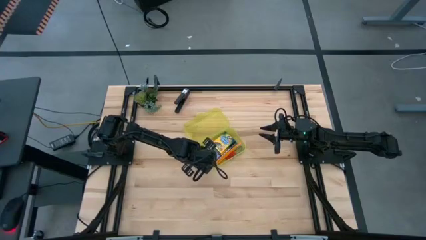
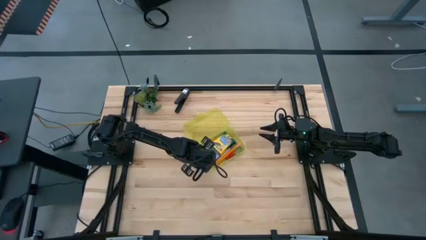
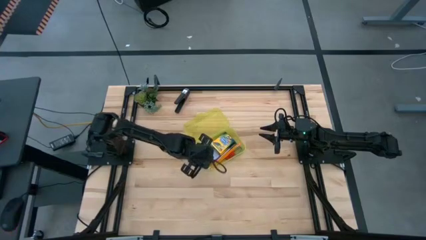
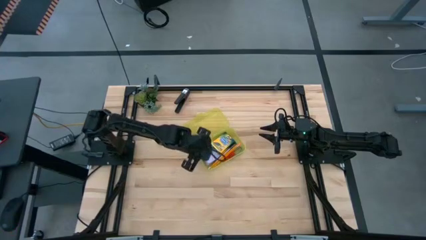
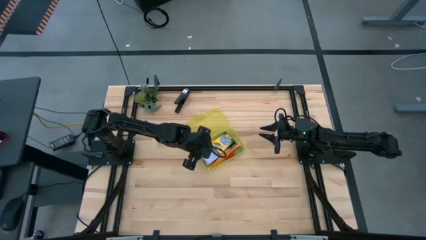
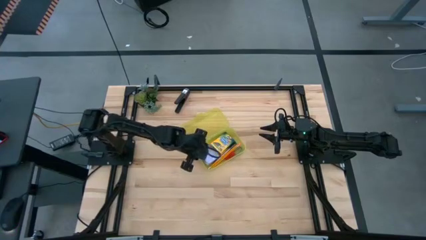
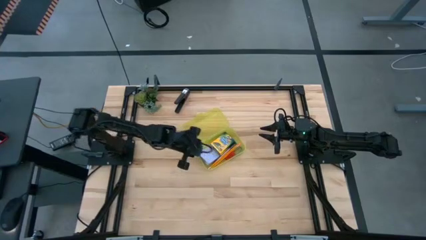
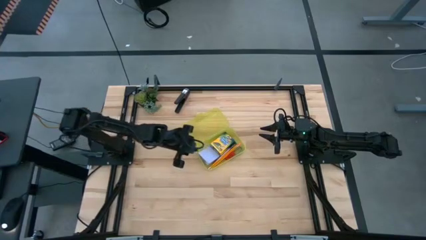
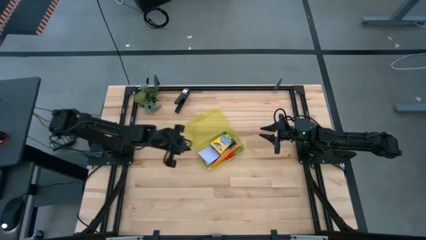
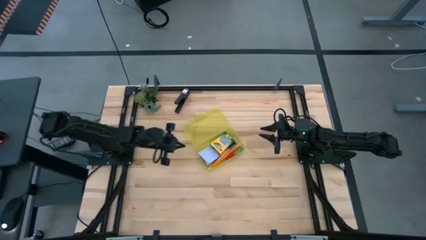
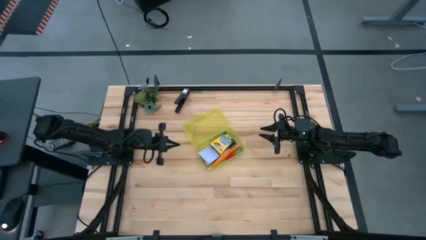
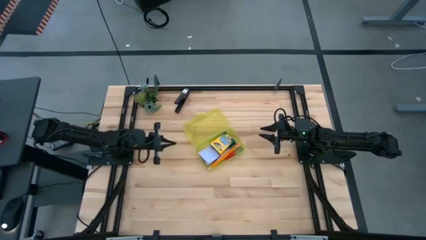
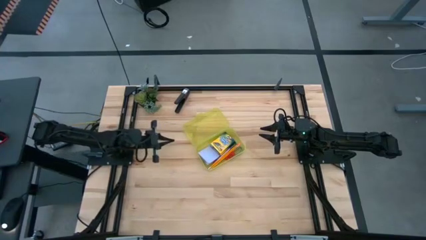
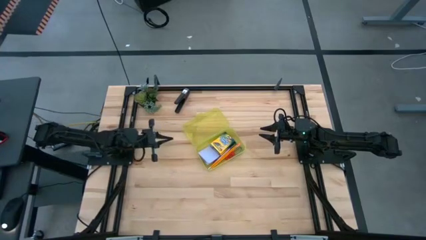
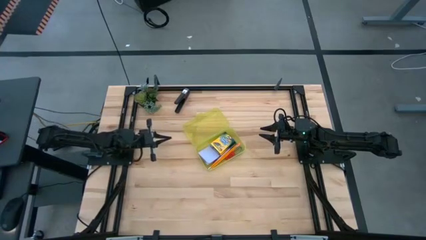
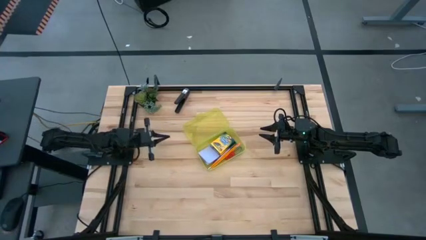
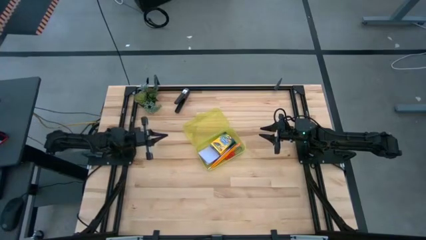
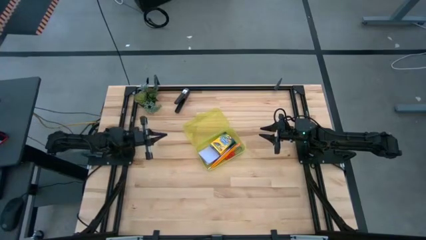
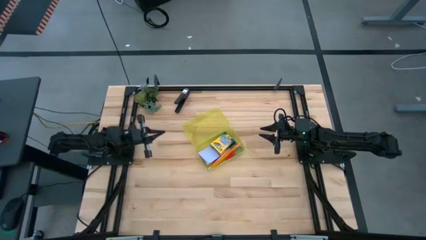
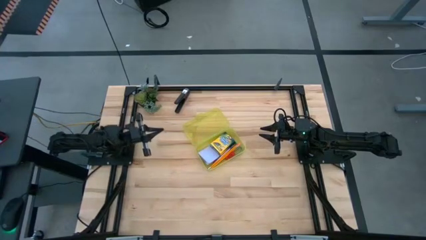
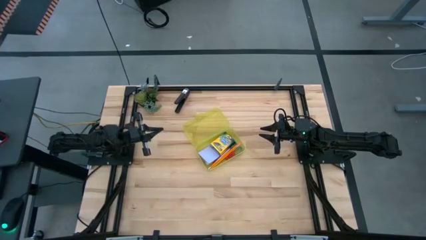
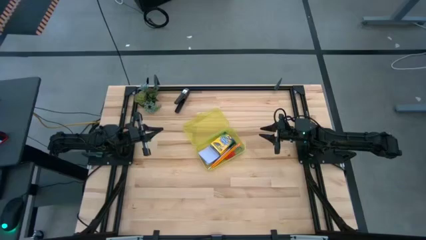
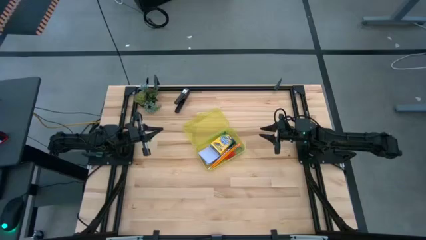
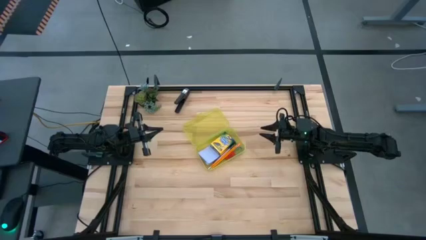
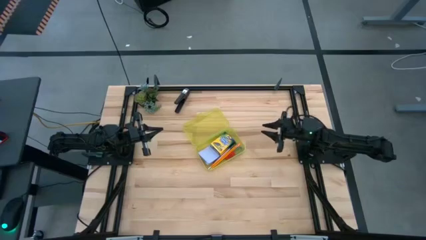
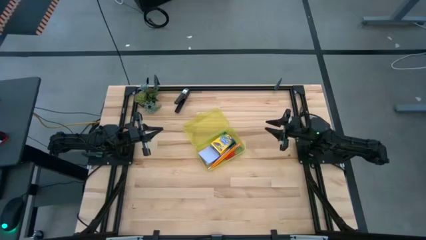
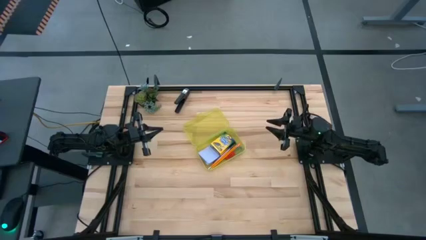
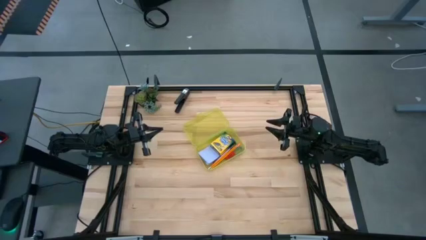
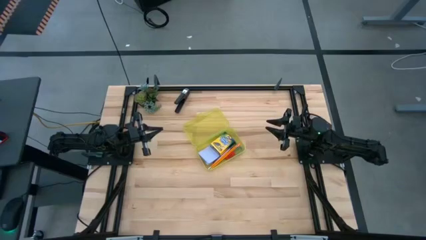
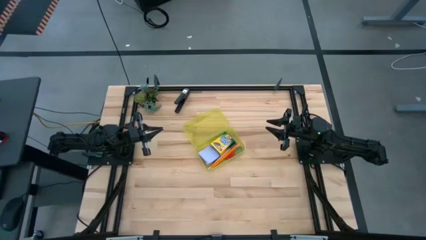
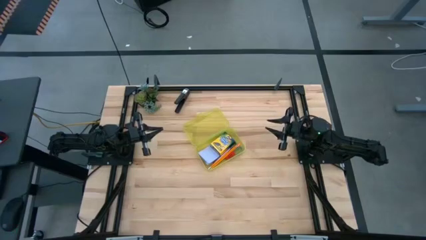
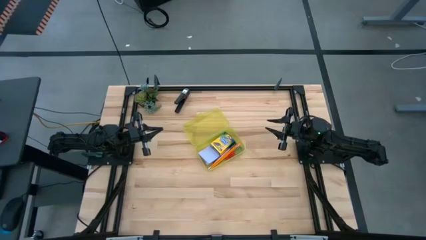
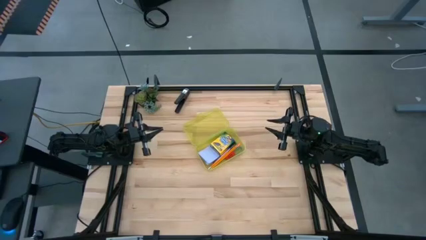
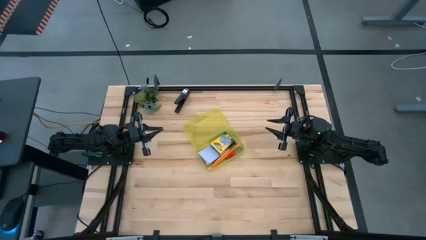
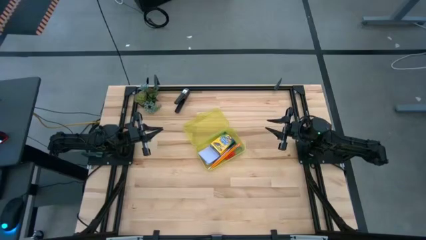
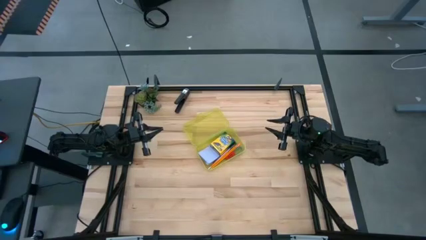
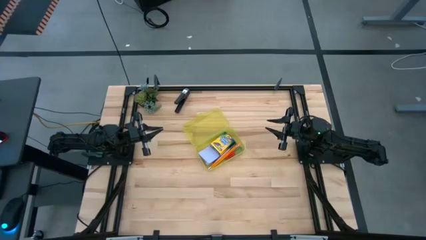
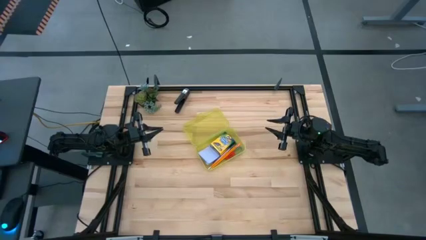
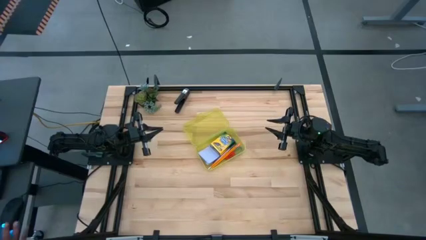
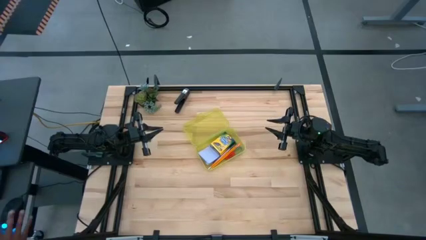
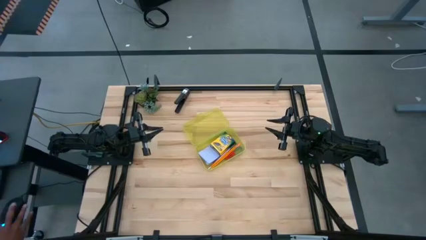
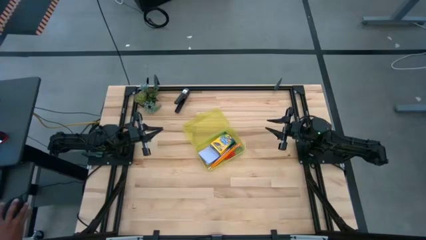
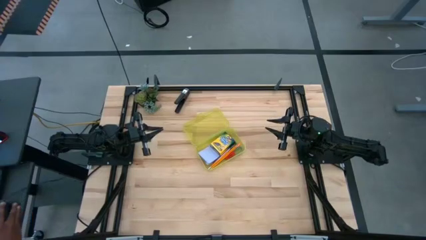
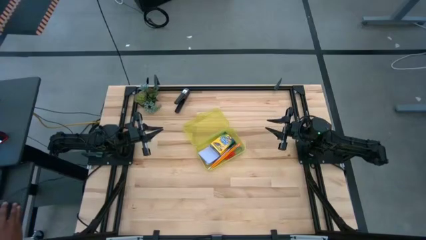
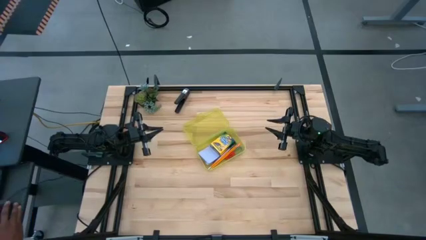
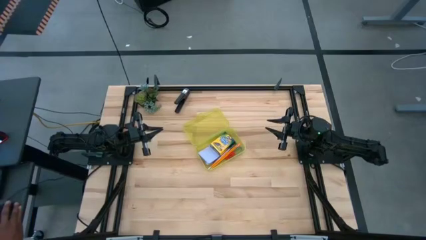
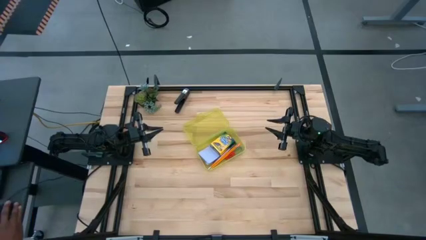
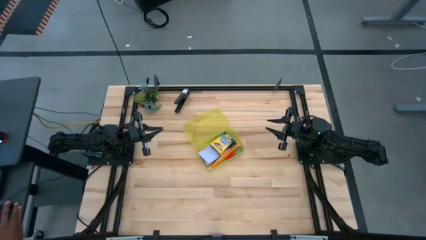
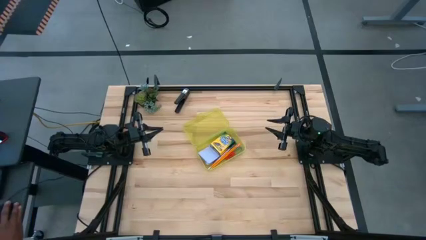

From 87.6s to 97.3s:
Task: Pack school essentials
Return to Home Position

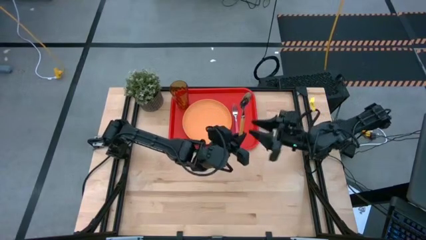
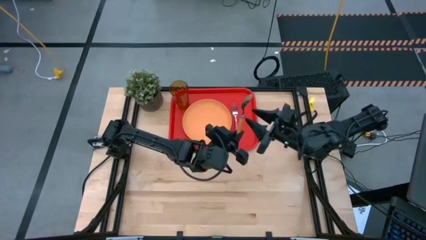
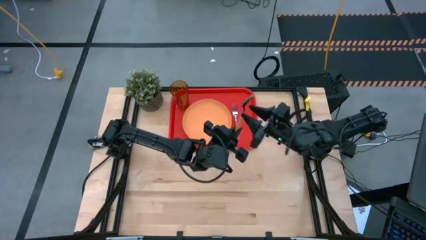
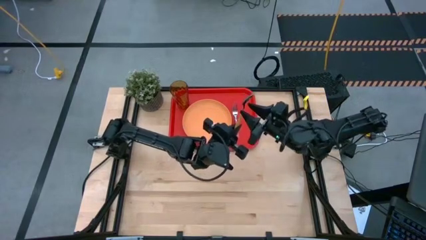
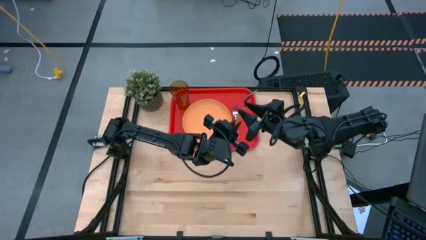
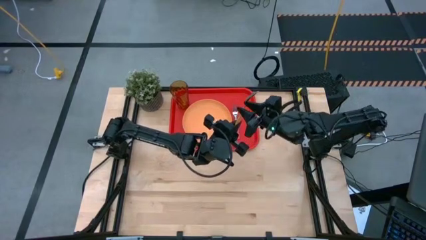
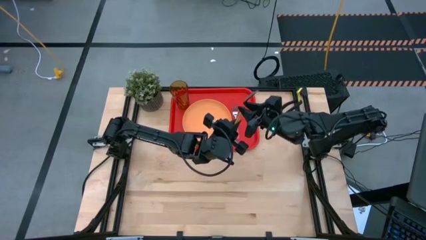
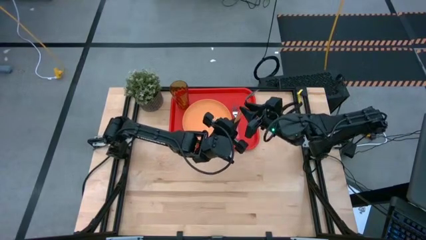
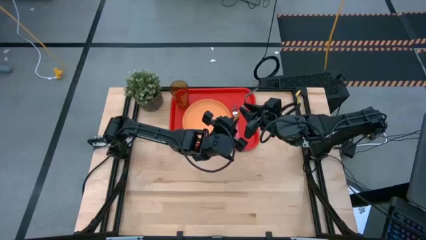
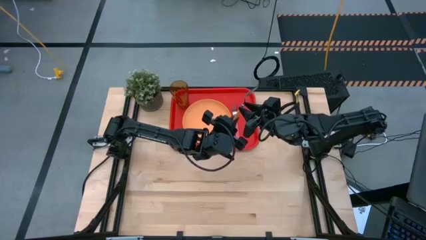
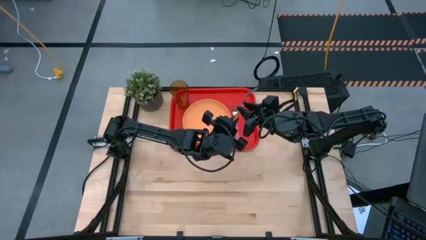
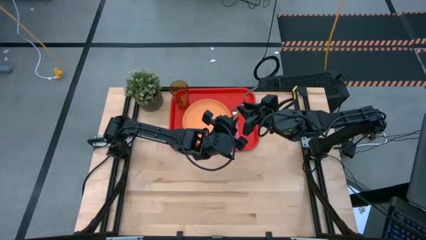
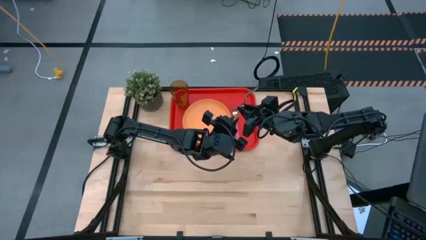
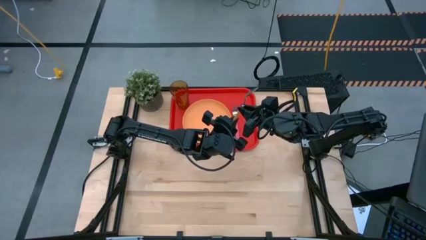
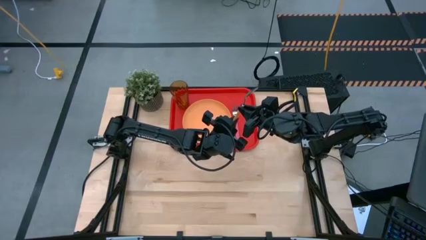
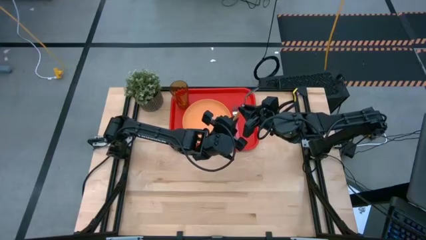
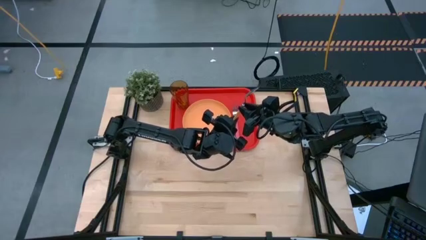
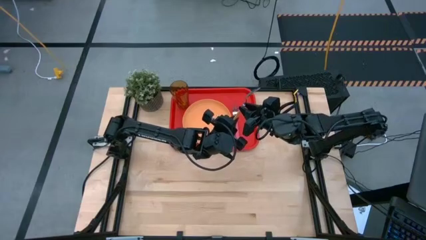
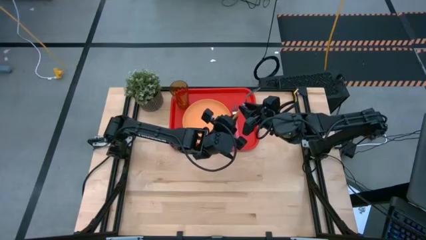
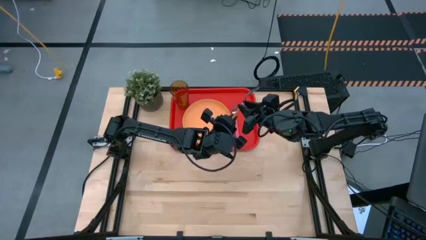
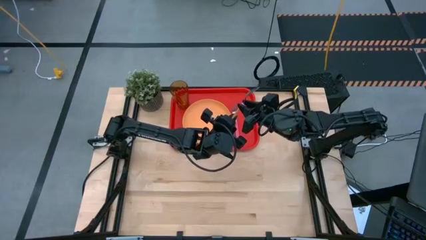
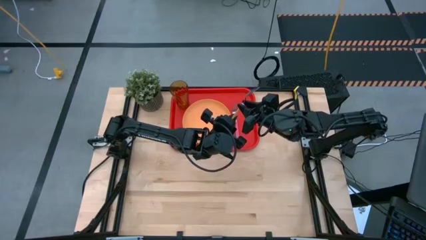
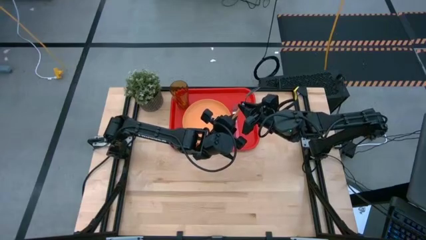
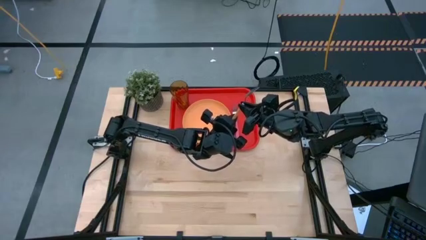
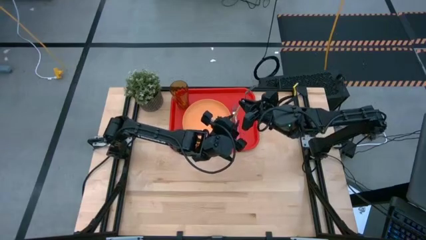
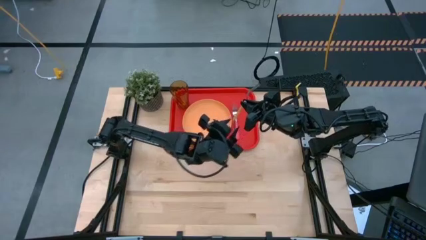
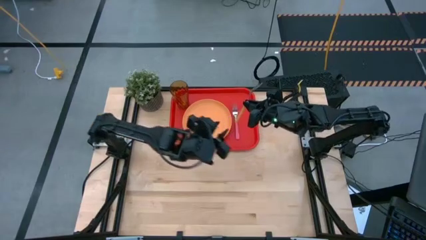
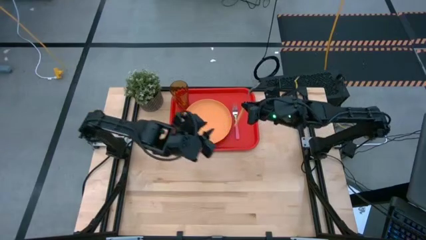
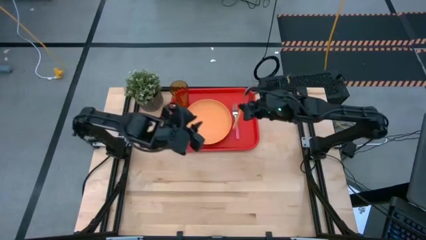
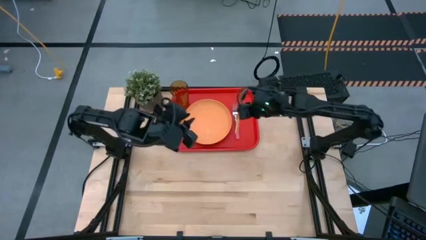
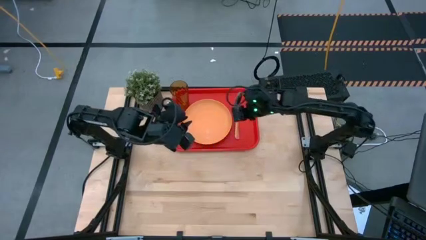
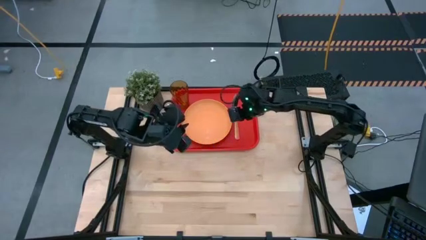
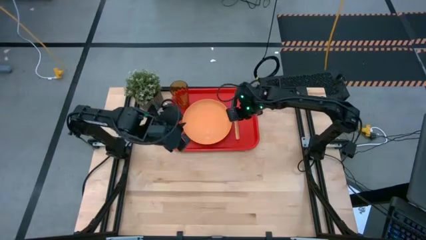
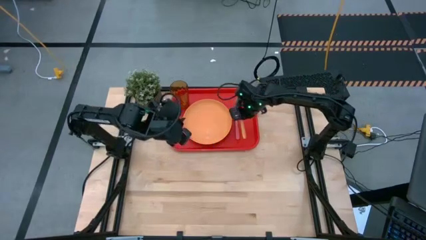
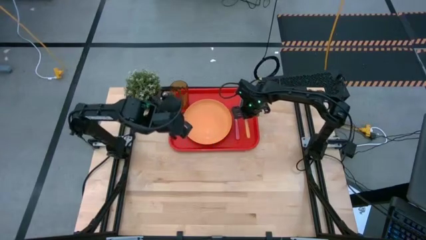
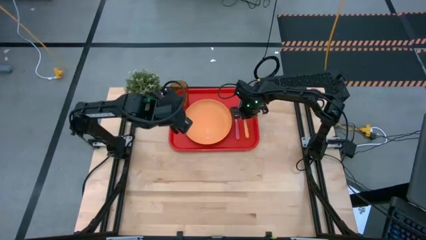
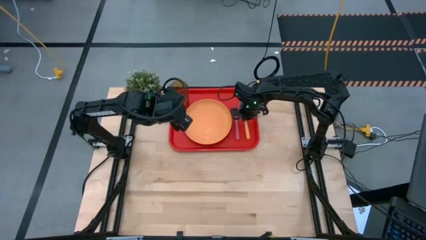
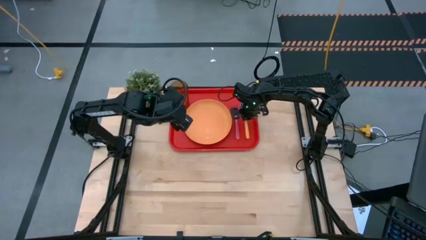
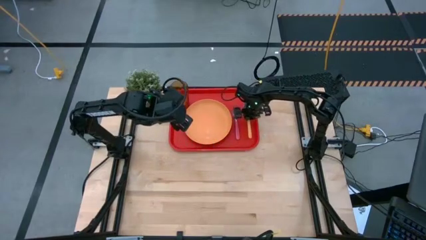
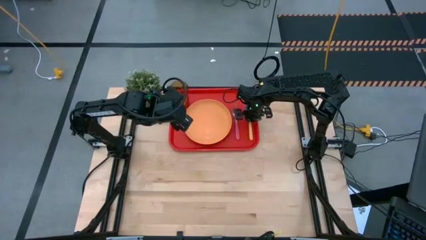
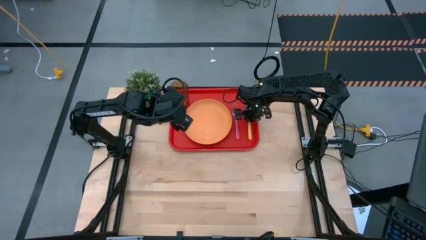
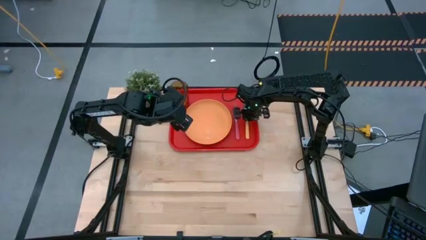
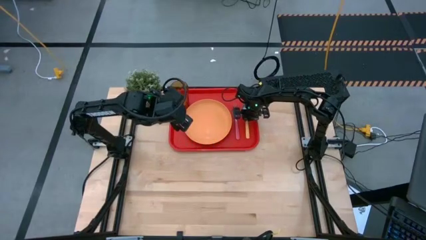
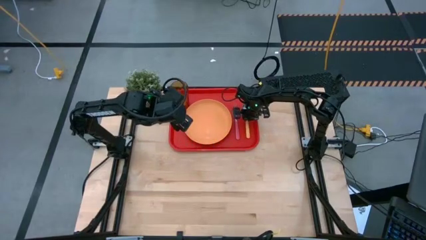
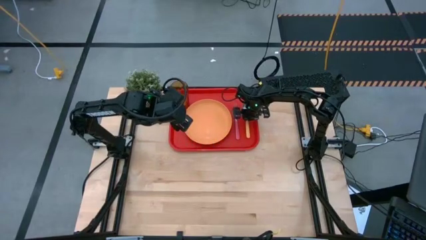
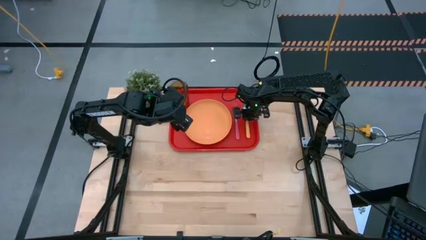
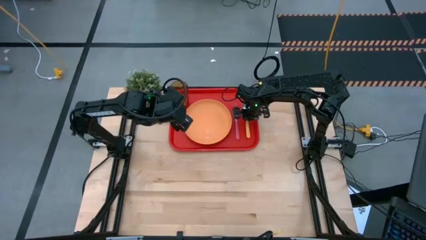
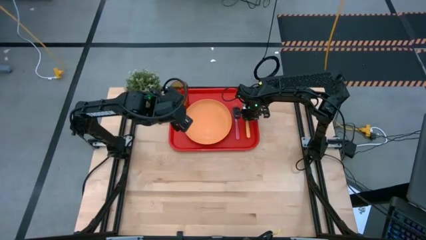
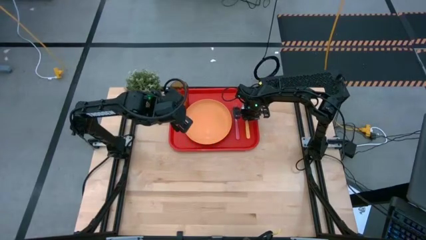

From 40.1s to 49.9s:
Task: Pick and place plate/cup/fork/spoon on tray
Put the yellow spoon on the red tray
